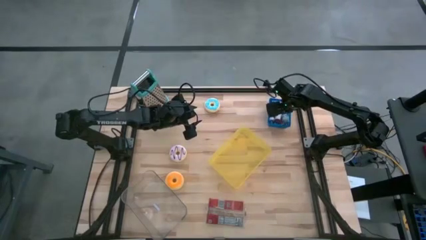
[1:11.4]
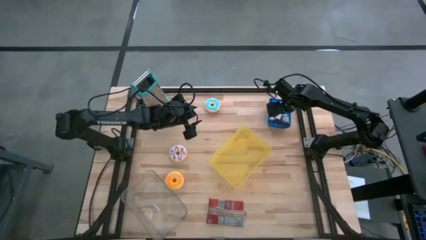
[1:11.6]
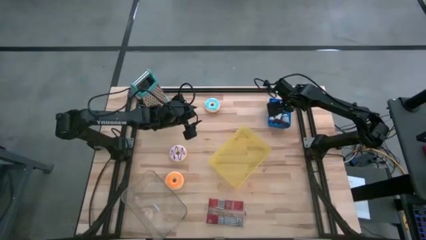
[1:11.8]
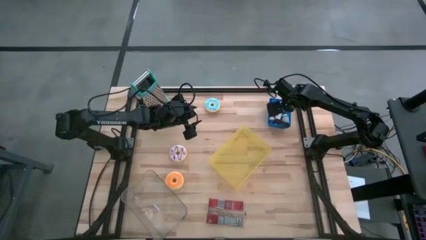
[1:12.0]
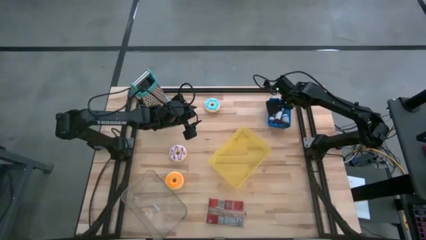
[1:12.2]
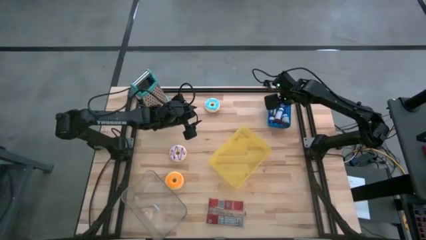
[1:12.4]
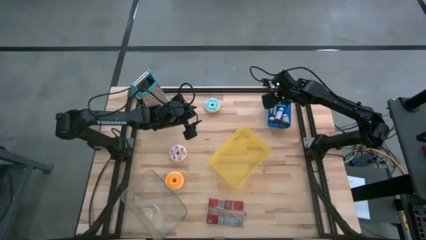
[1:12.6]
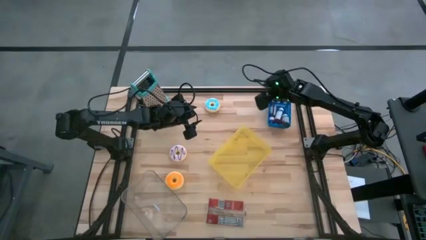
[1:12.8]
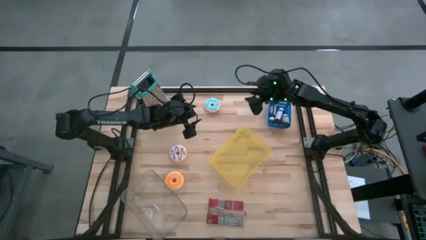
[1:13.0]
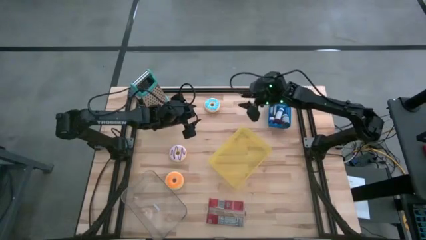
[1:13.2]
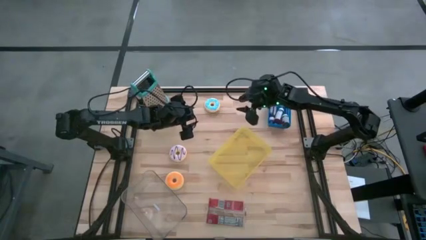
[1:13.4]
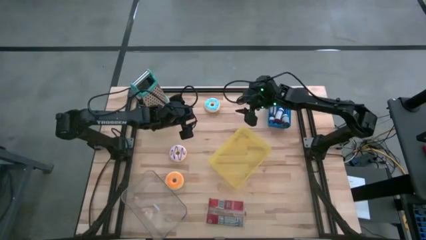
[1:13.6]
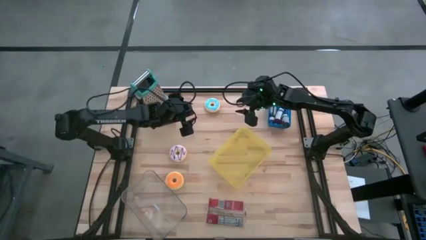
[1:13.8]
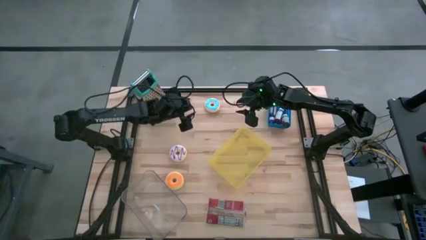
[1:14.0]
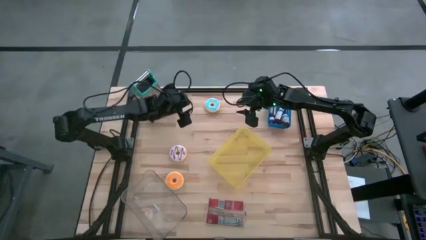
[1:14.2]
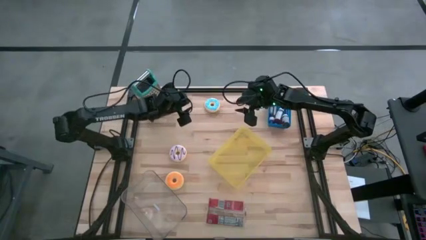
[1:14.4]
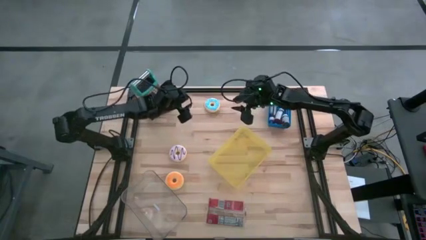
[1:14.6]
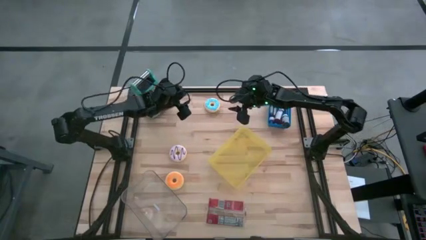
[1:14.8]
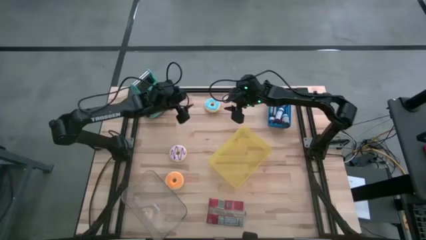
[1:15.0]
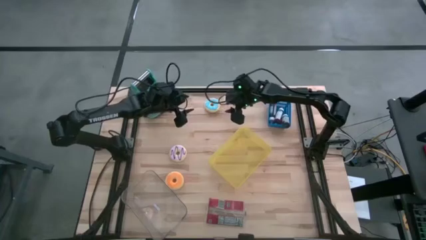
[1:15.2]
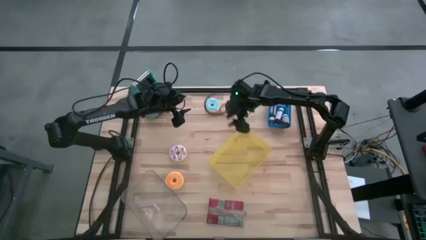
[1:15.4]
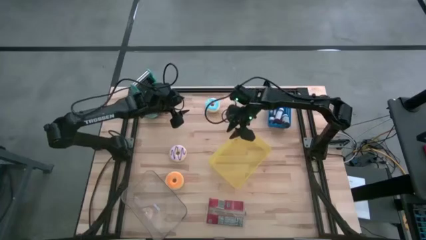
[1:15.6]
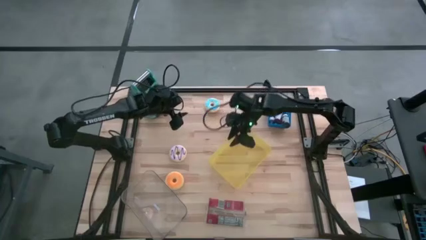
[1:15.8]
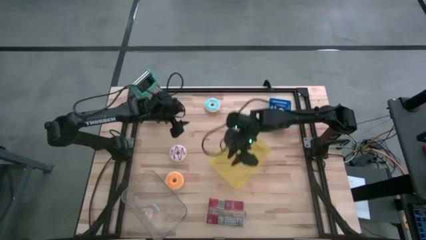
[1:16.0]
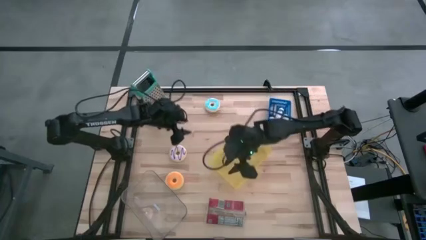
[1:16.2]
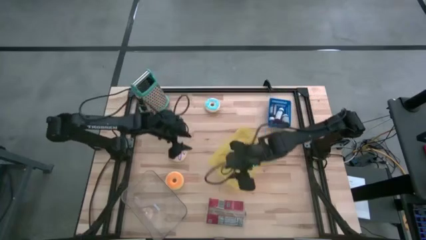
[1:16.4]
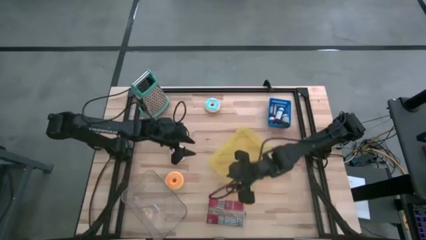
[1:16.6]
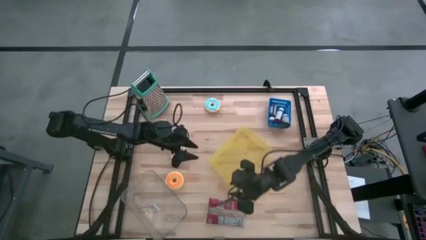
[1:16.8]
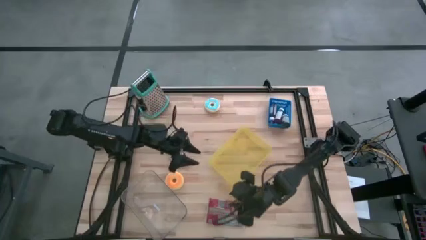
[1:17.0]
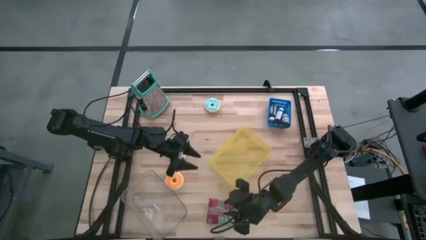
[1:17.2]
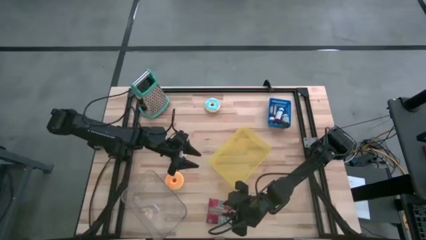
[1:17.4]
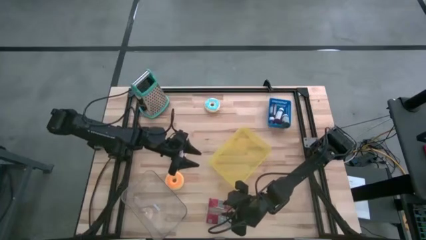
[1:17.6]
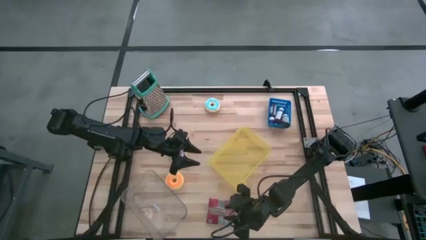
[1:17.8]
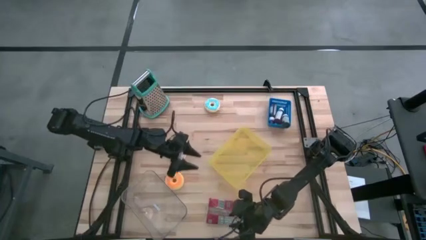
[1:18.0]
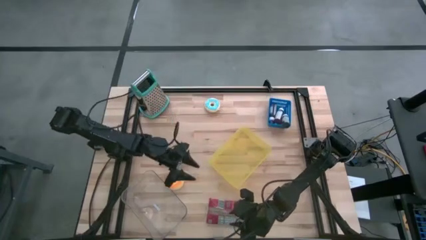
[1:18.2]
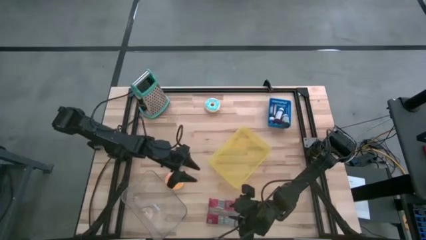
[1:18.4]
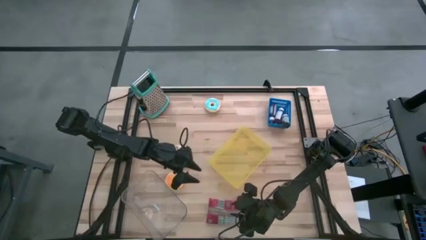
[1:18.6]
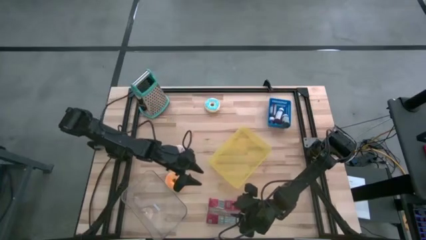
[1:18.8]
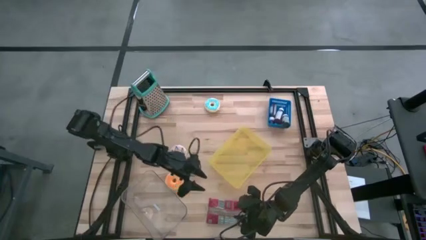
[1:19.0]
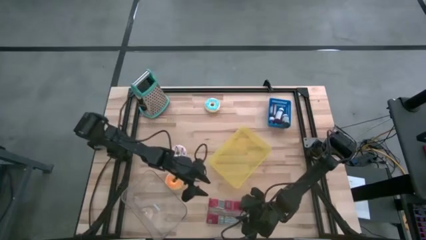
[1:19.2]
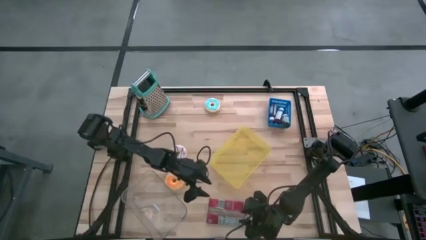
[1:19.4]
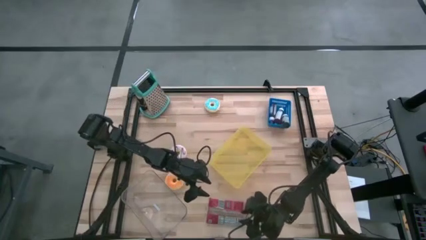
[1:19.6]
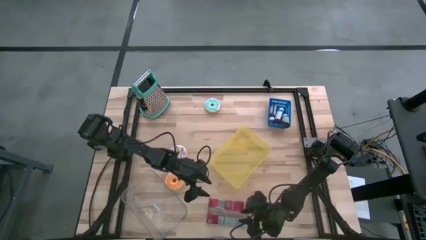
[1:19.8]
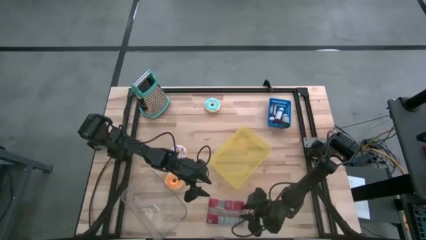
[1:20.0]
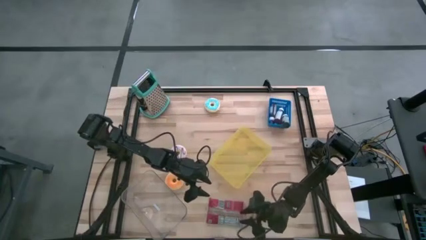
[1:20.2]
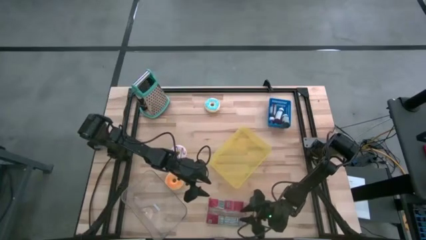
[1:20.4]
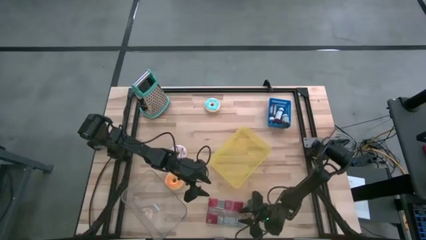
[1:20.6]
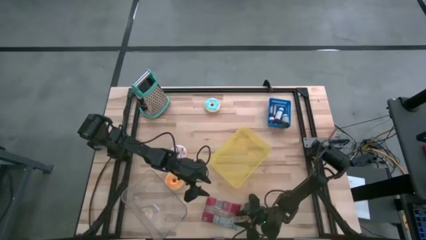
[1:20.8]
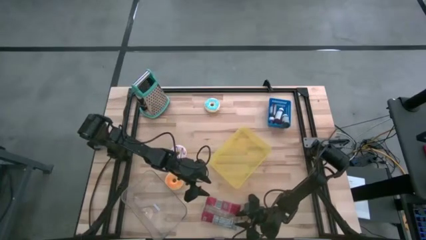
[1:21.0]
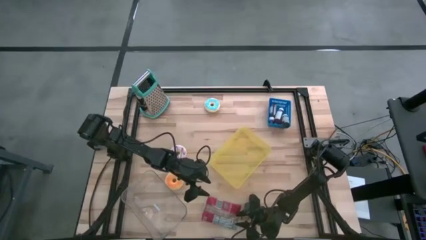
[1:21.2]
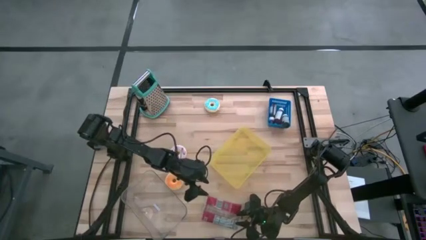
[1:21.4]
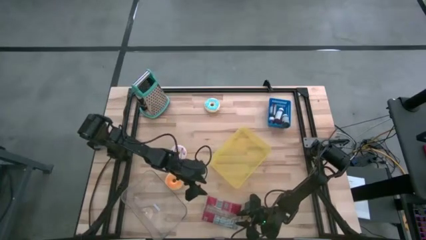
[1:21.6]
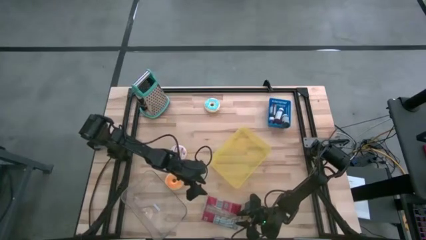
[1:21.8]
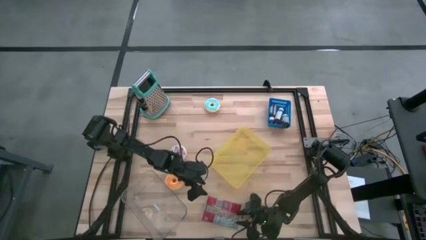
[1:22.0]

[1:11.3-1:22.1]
Task: Pick & Place Food Item
Put the red popcorn bag into the transparent bin

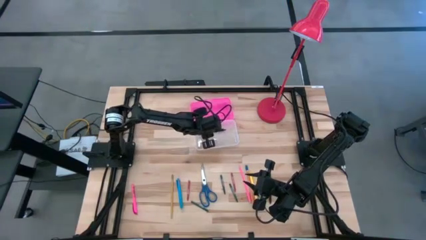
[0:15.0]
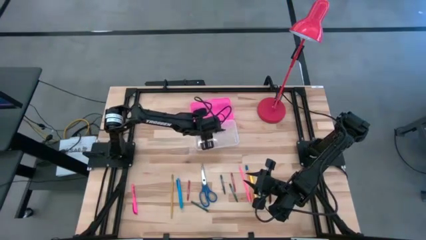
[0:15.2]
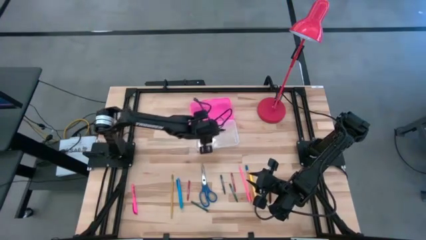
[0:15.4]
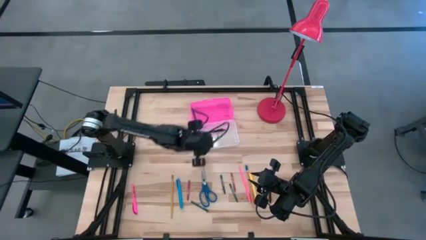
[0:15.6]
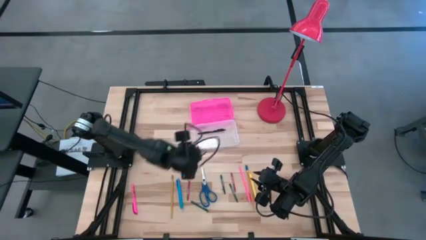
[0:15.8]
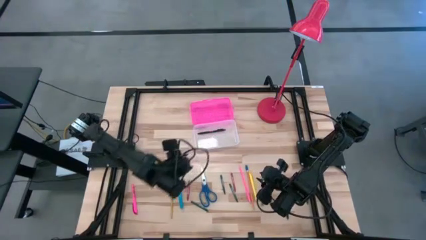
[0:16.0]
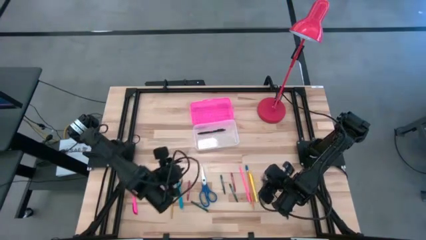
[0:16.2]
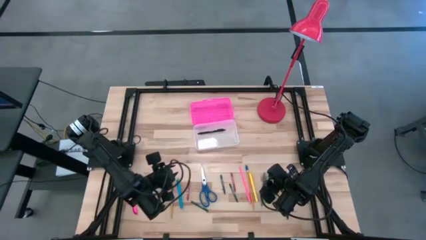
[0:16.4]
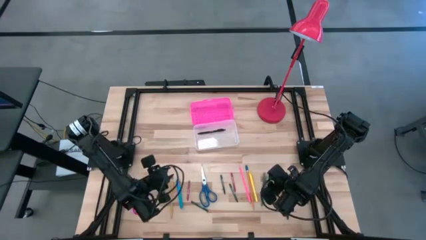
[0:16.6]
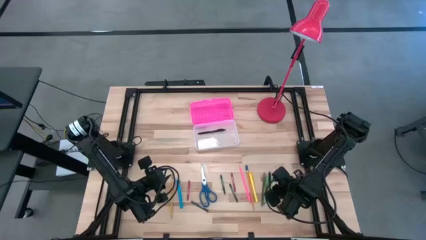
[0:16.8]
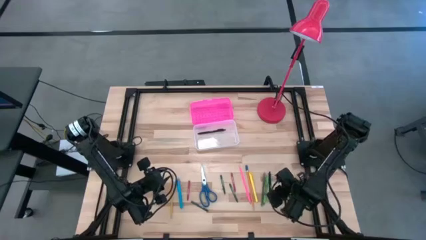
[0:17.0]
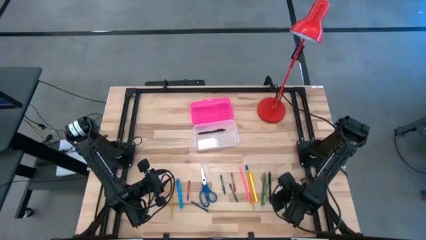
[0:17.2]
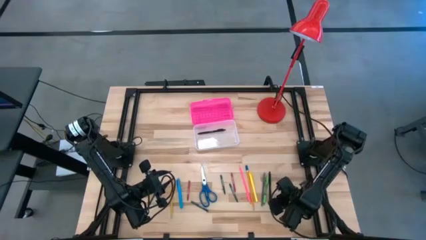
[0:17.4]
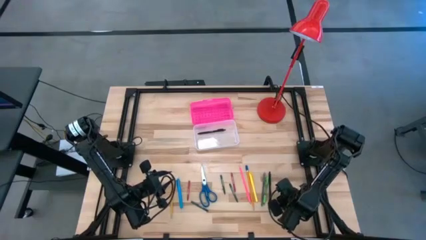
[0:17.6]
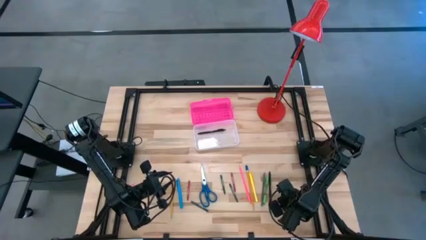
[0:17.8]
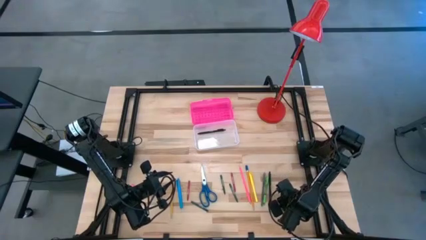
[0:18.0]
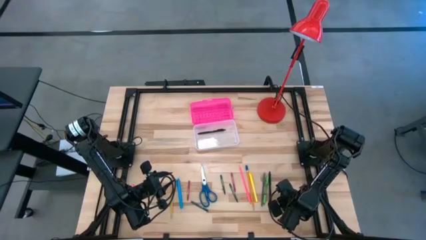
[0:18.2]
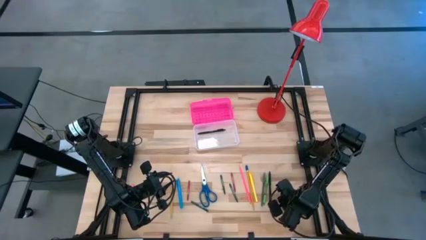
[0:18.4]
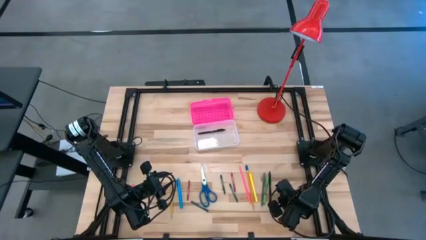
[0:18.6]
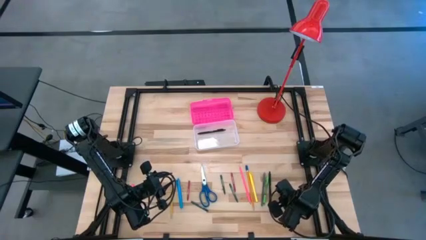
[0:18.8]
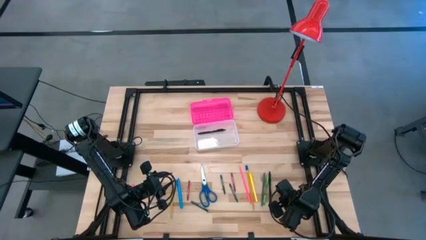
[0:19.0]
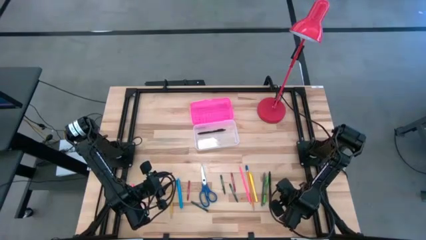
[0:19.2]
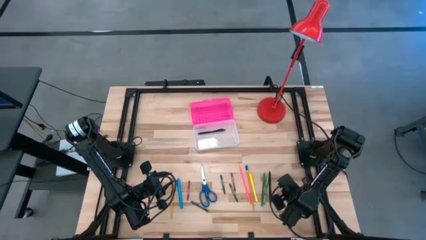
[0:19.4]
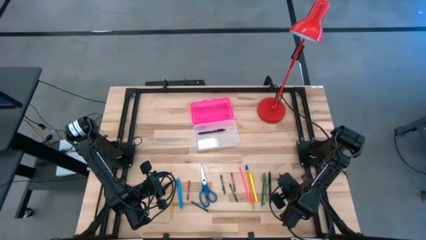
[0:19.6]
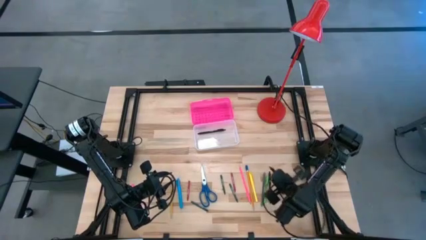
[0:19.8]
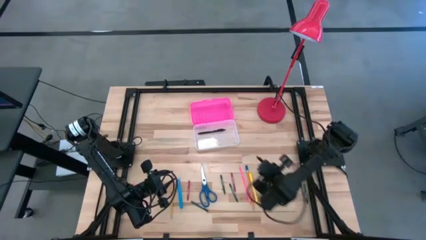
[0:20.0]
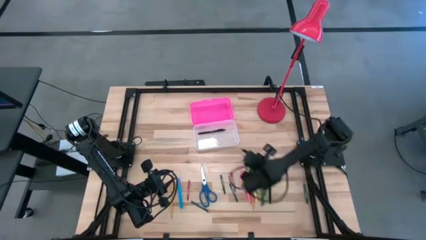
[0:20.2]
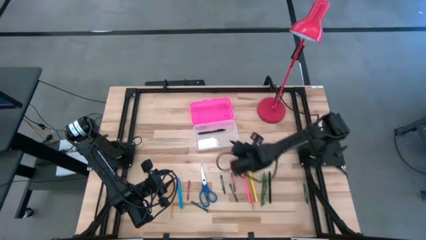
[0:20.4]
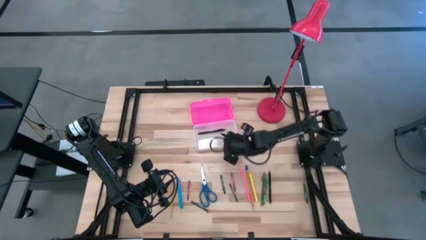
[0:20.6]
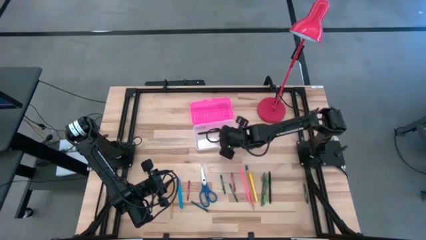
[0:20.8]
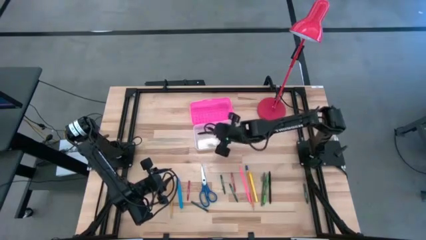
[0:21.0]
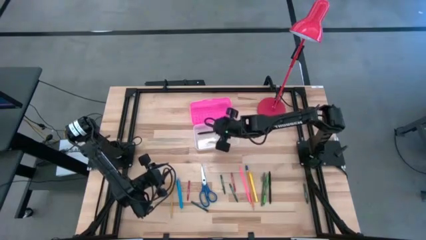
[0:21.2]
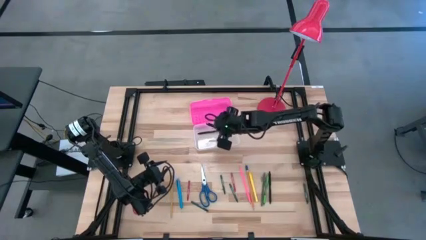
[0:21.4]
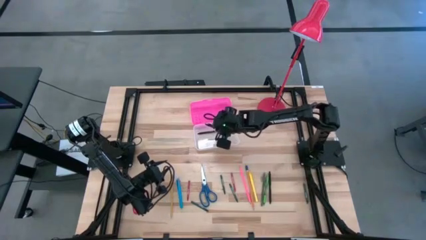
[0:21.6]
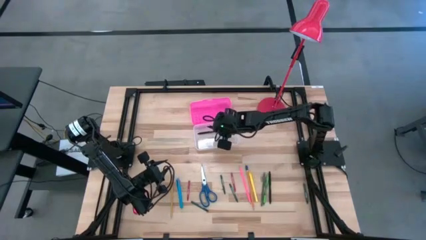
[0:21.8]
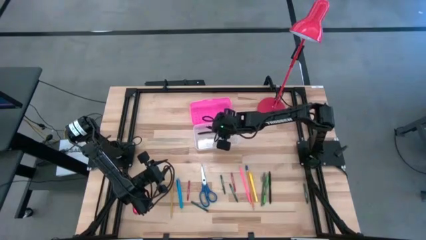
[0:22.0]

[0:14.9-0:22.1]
Task: Pick & place school supplies into a supply box
Put the black pen into the pink supply box
